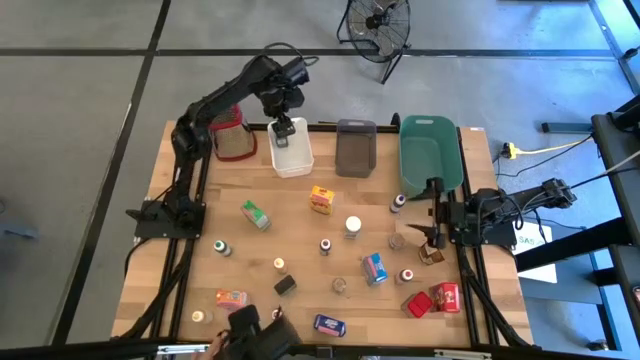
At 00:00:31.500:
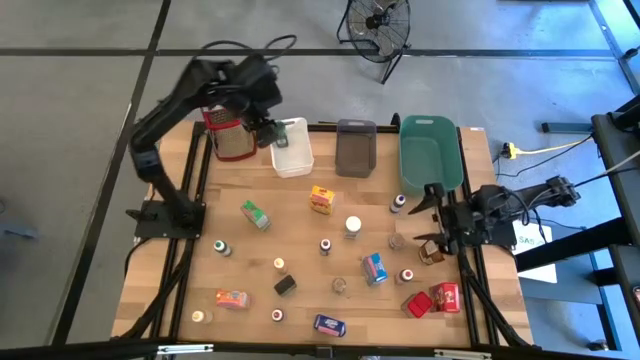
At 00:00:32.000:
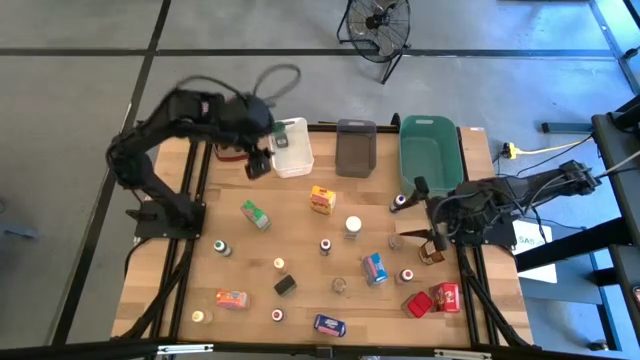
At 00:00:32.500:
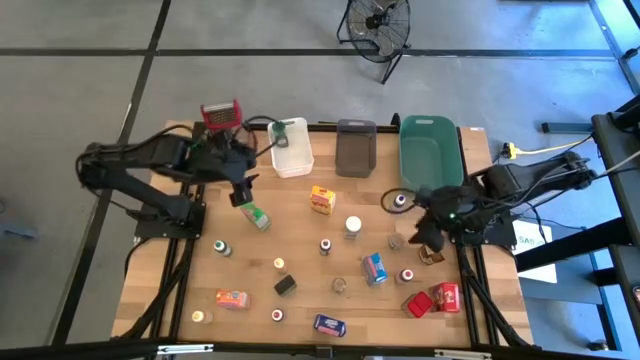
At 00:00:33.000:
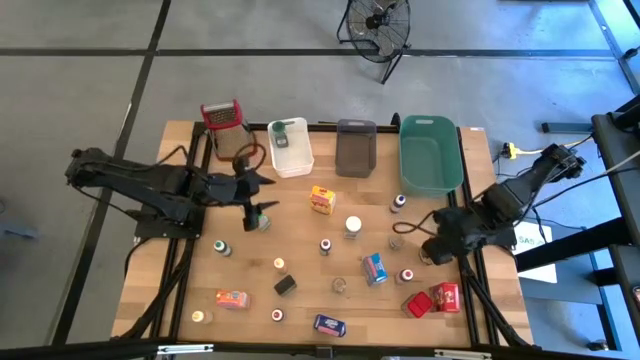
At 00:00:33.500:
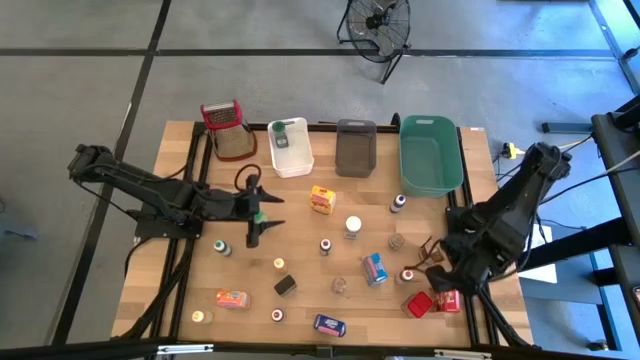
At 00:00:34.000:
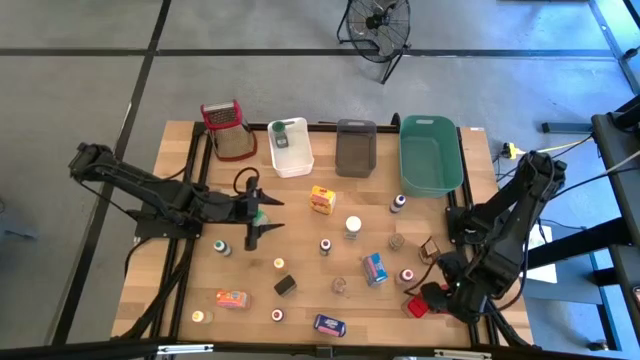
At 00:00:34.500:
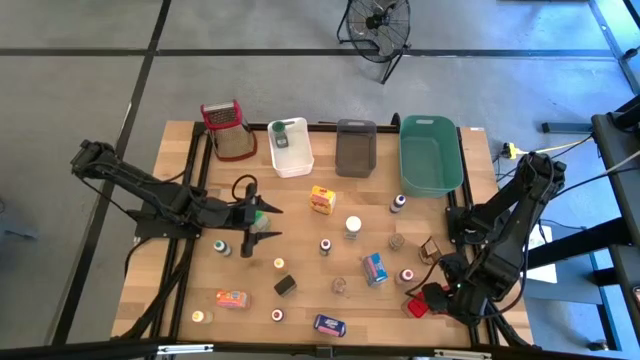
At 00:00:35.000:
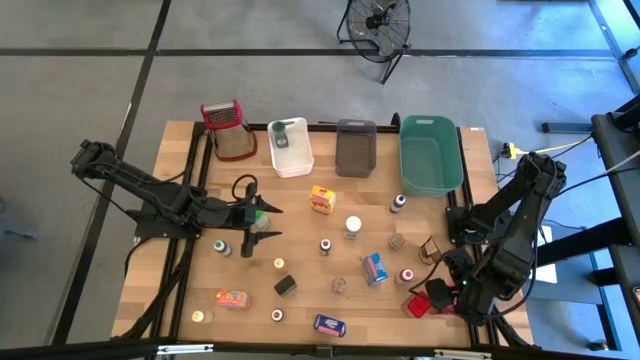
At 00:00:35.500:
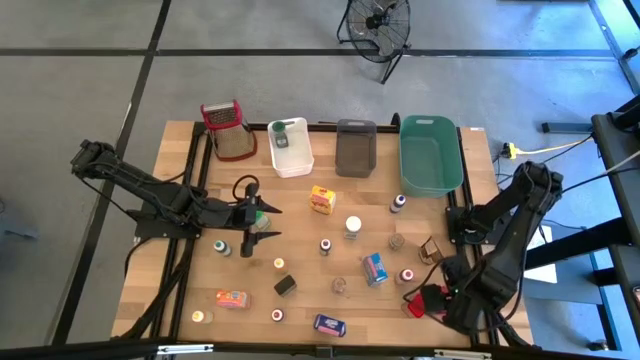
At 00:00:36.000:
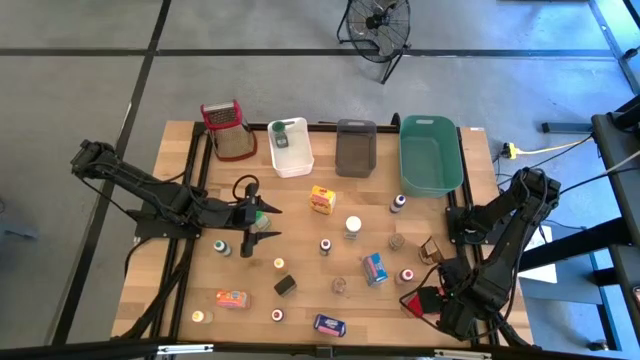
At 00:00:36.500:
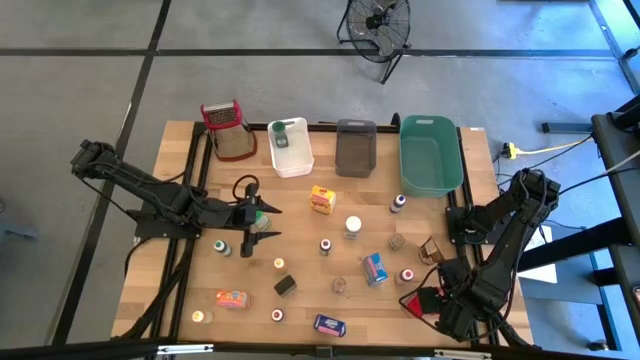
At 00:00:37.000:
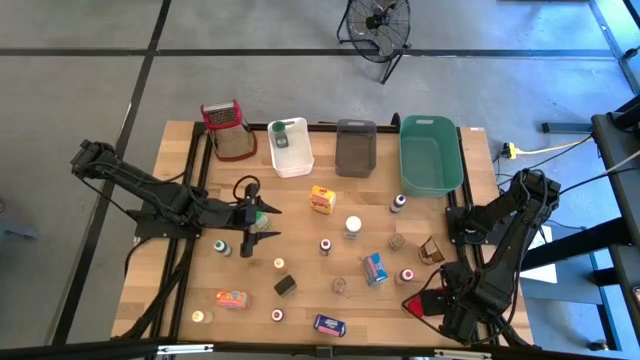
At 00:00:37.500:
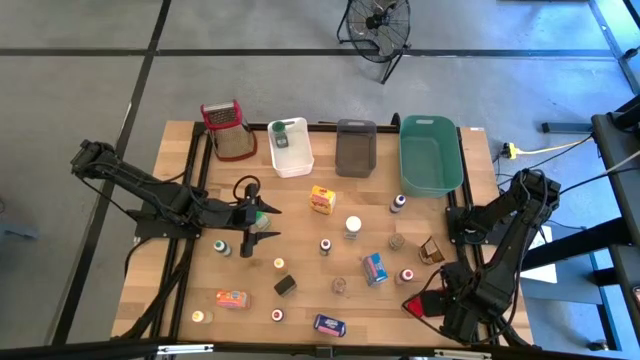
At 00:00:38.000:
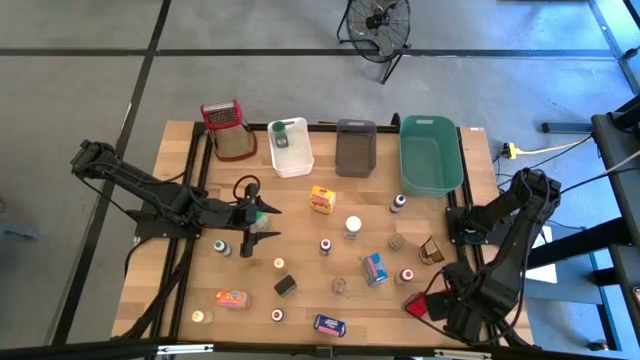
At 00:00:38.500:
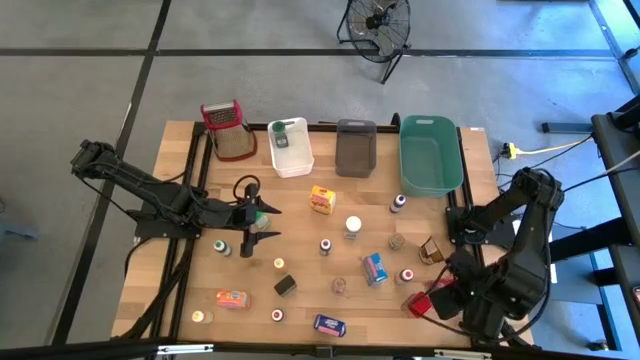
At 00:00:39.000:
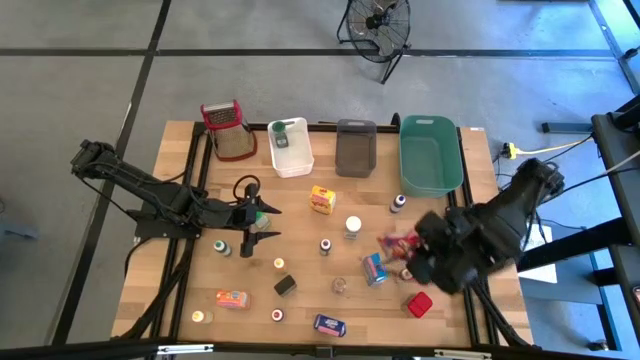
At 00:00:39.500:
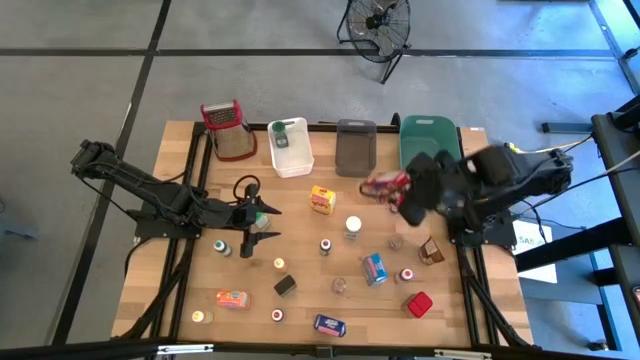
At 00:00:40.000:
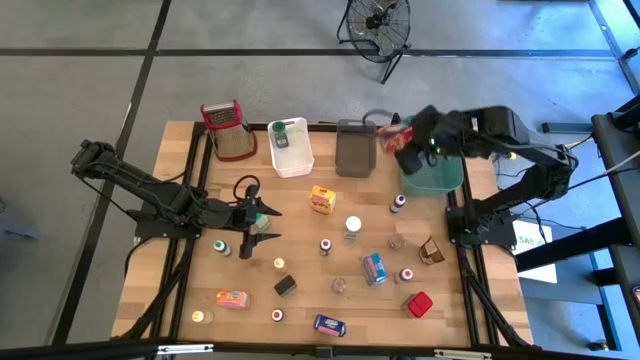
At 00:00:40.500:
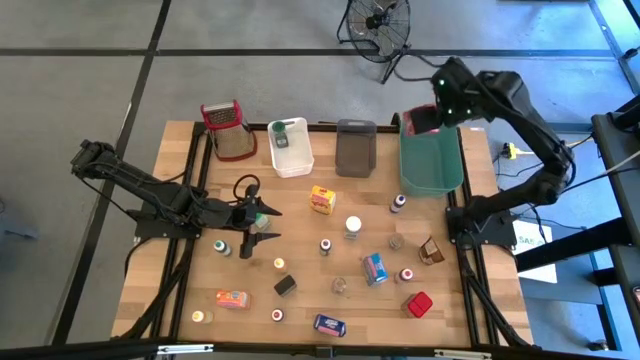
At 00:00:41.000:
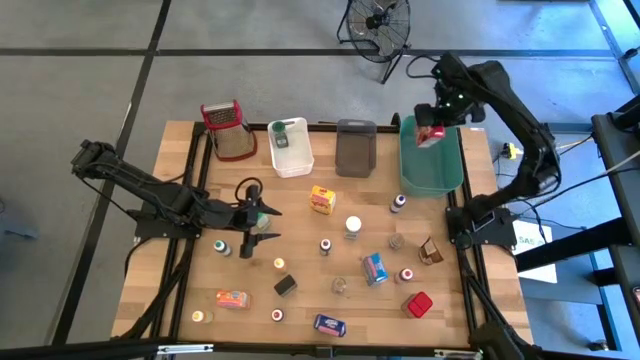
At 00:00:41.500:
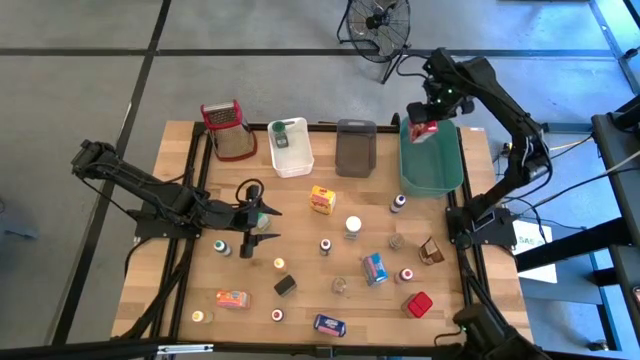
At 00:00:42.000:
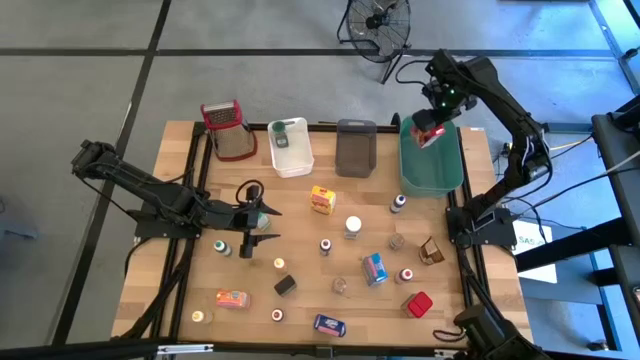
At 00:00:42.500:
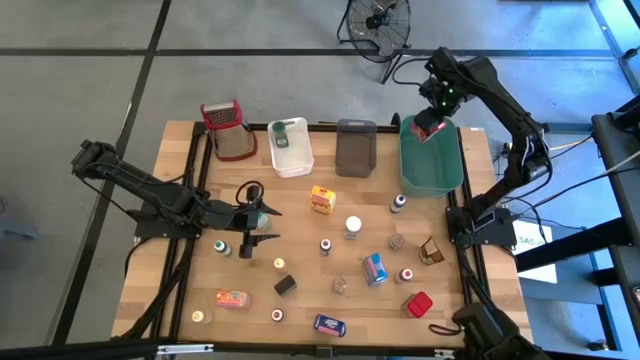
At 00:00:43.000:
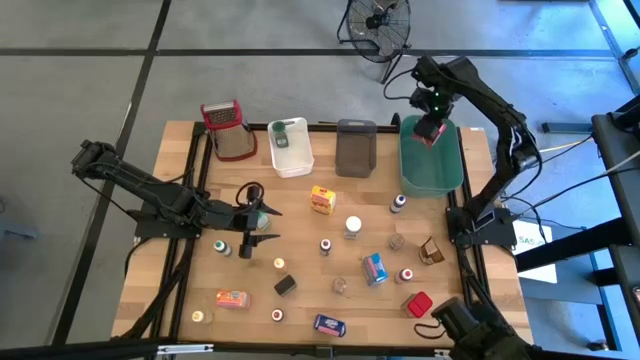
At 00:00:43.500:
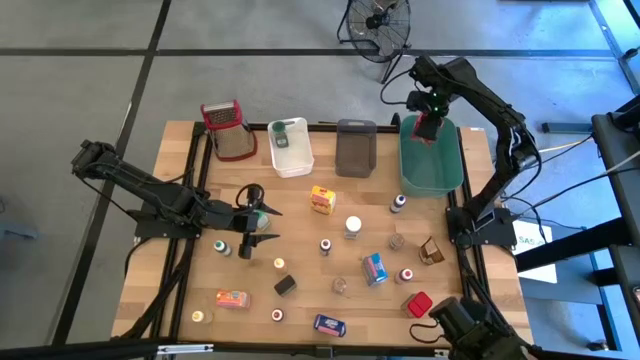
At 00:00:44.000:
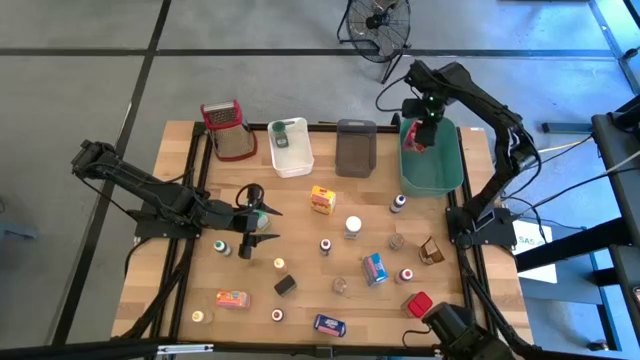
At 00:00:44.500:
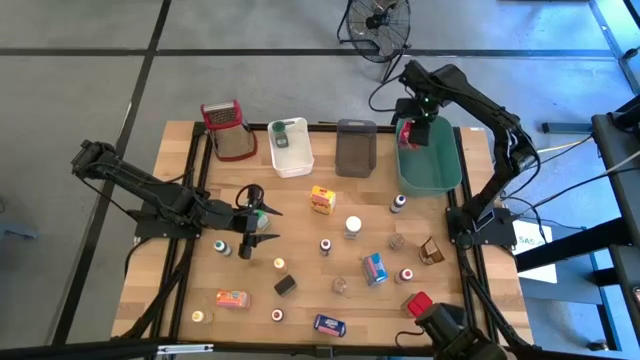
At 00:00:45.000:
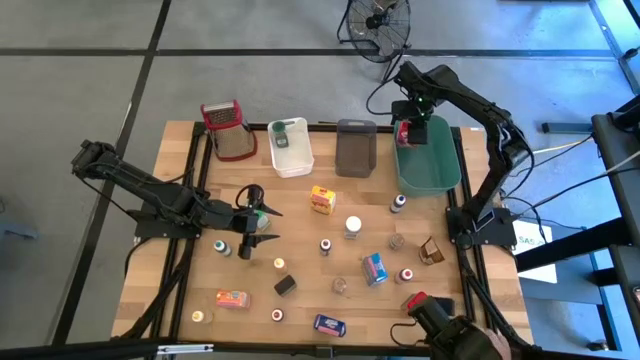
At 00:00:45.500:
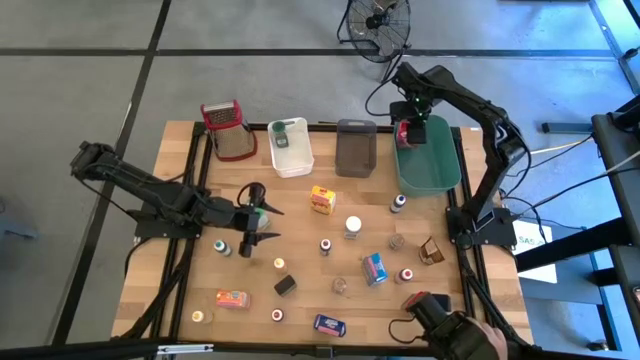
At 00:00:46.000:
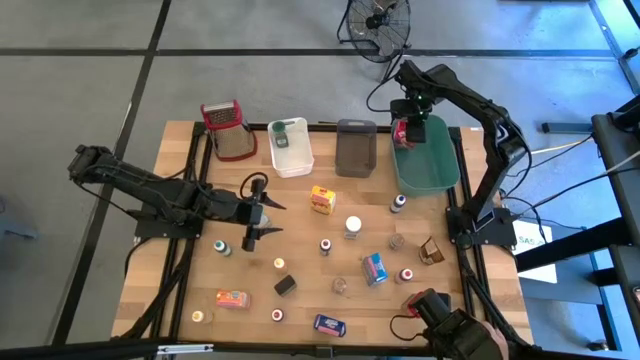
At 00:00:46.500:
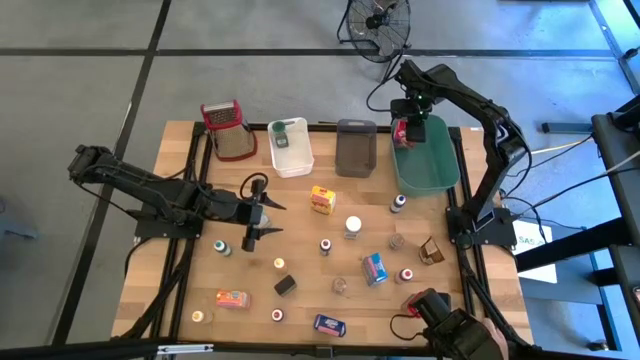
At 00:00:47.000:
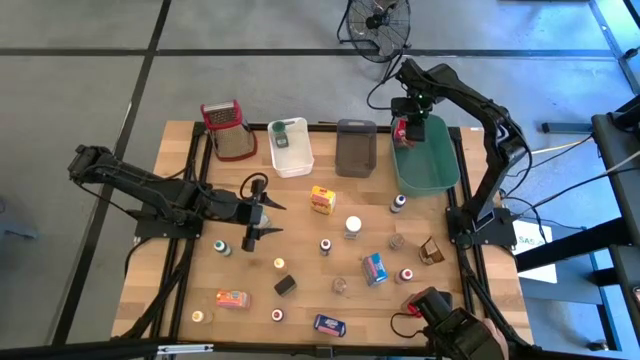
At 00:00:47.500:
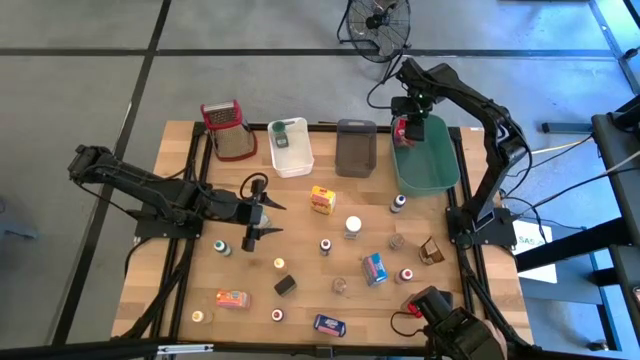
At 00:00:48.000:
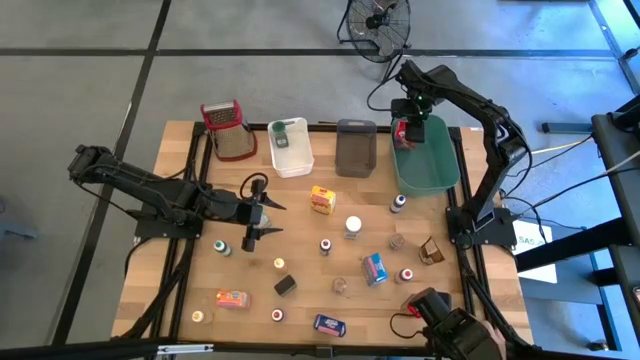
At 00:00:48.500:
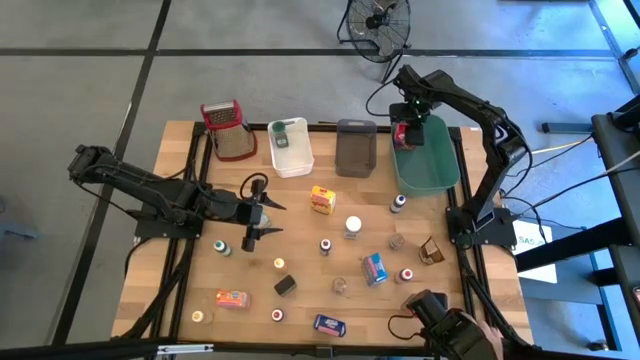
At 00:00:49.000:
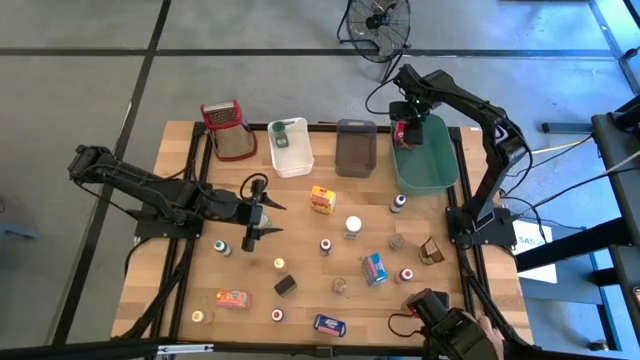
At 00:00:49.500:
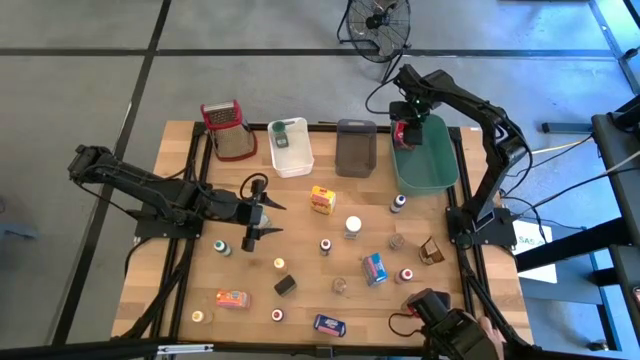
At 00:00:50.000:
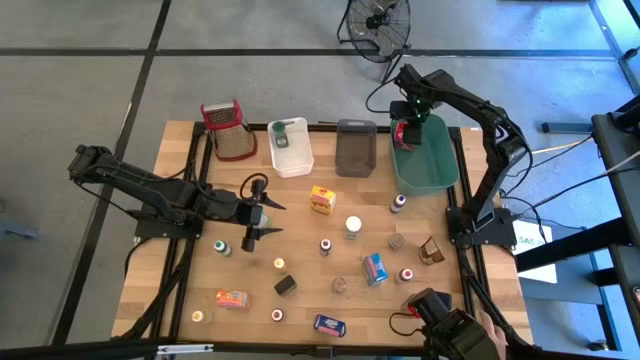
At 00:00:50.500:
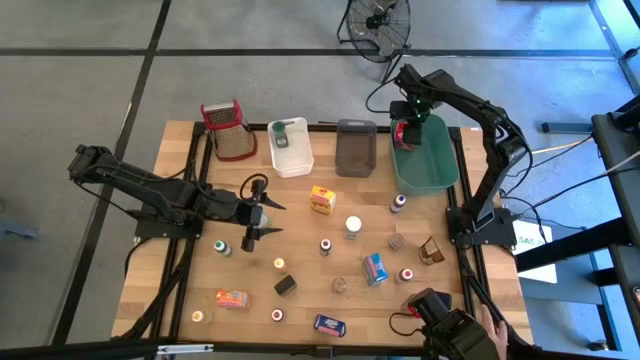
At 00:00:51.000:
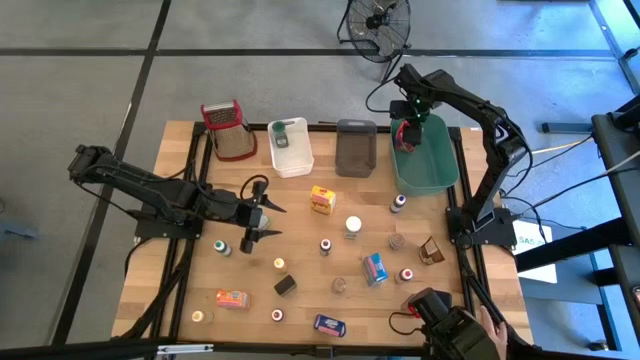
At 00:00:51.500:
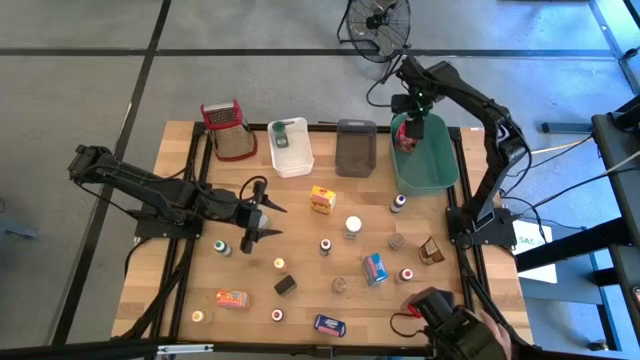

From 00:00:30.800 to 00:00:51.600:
Task: Pick & Place Kitchen Items
Put the red cereal box into the green bin
